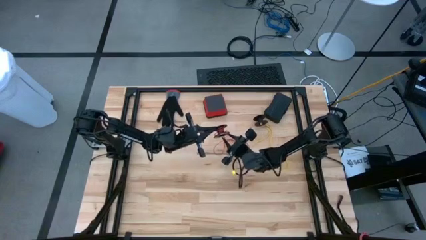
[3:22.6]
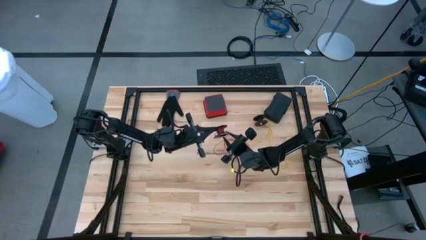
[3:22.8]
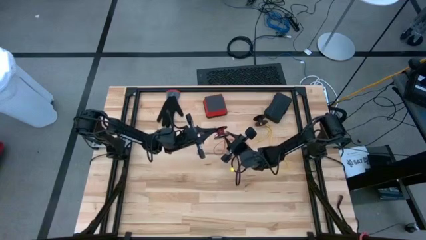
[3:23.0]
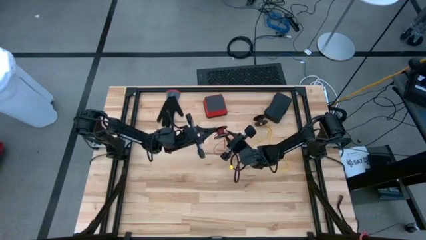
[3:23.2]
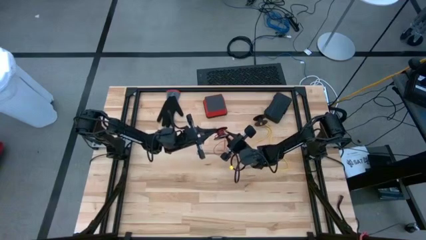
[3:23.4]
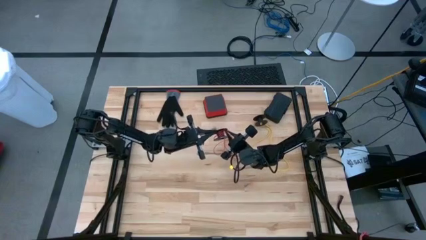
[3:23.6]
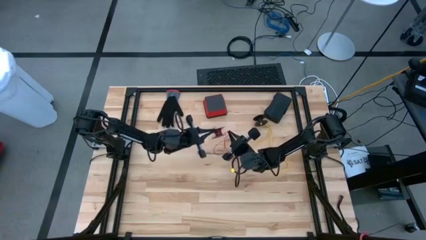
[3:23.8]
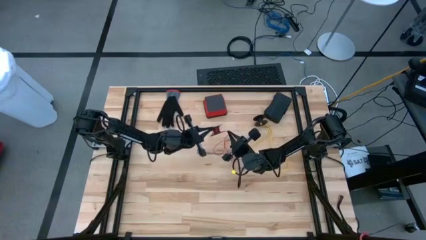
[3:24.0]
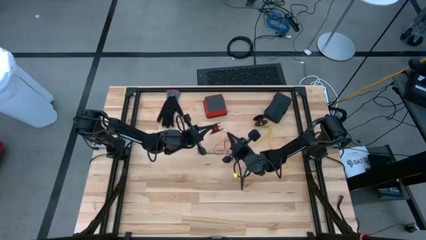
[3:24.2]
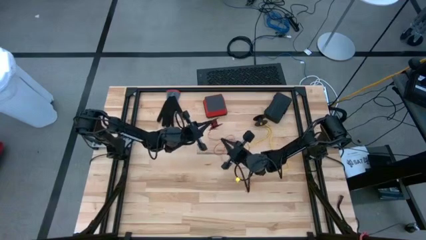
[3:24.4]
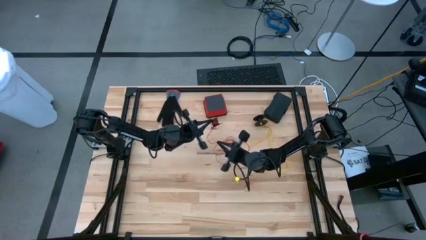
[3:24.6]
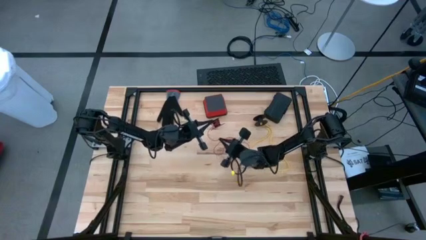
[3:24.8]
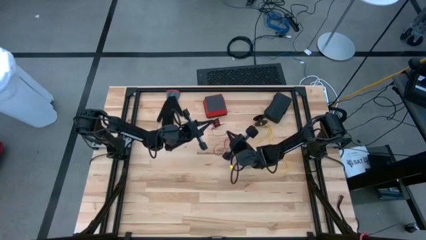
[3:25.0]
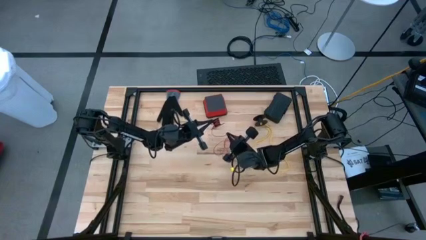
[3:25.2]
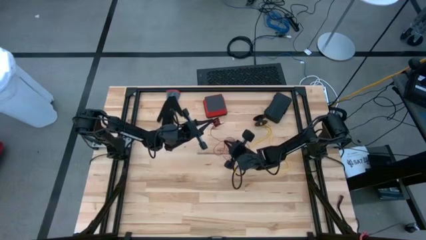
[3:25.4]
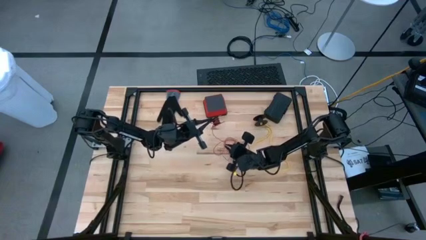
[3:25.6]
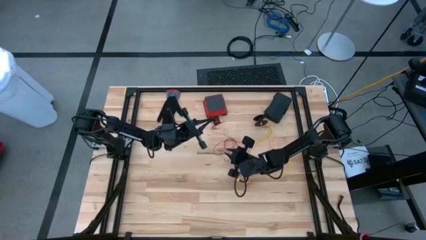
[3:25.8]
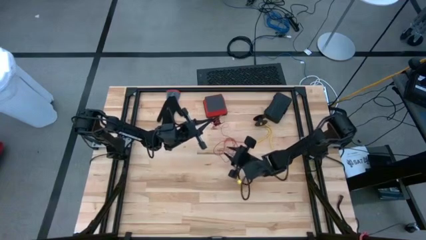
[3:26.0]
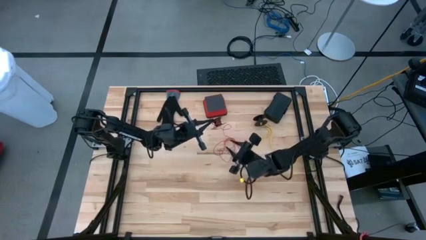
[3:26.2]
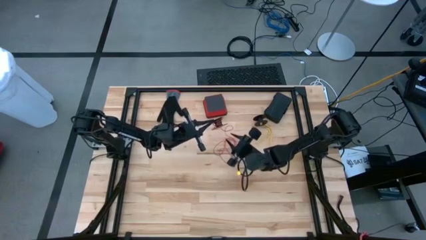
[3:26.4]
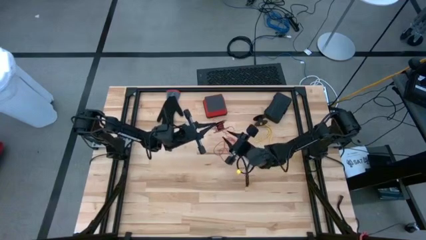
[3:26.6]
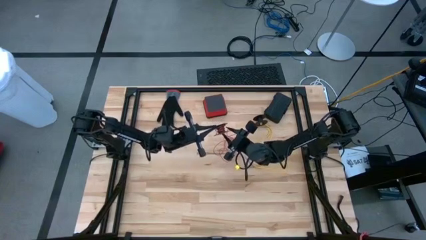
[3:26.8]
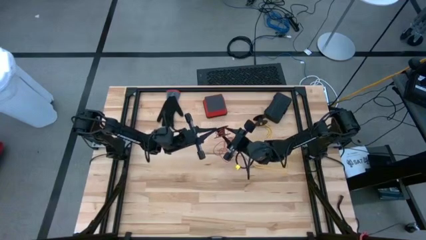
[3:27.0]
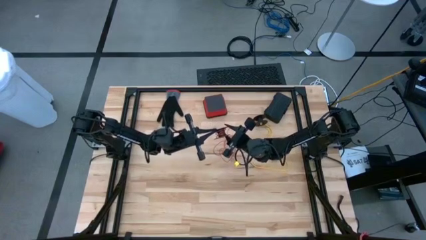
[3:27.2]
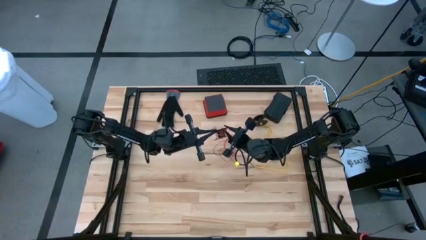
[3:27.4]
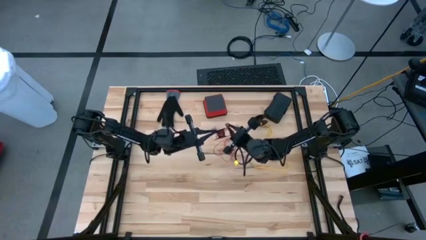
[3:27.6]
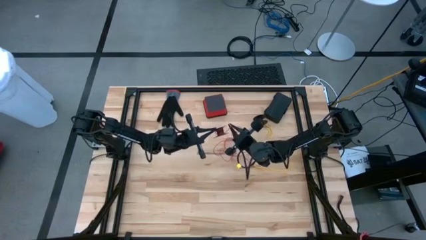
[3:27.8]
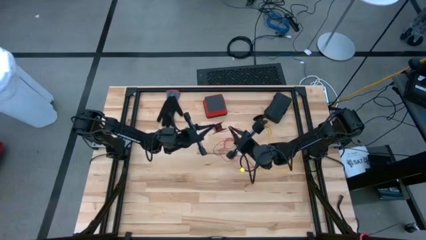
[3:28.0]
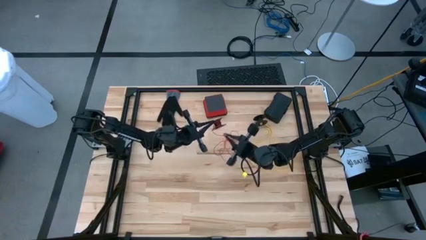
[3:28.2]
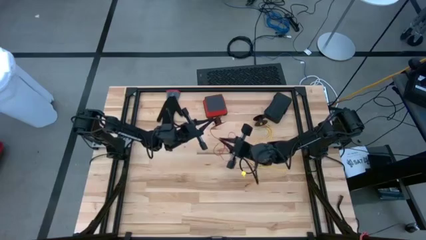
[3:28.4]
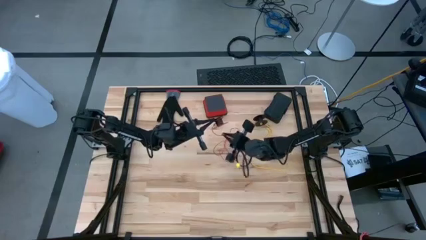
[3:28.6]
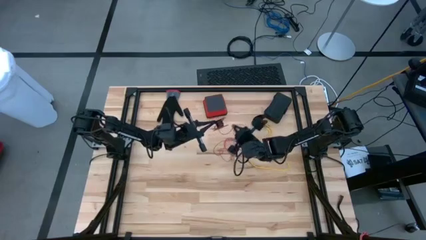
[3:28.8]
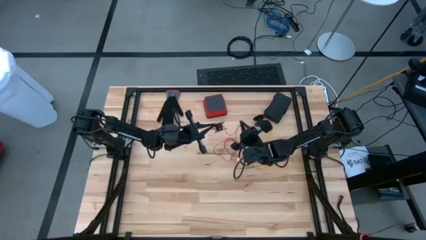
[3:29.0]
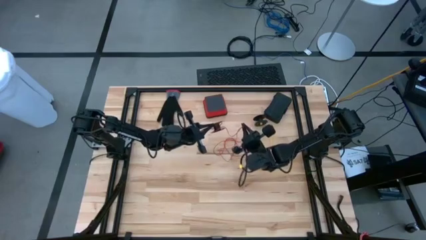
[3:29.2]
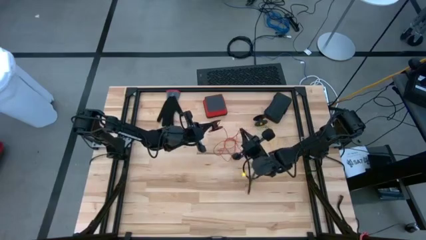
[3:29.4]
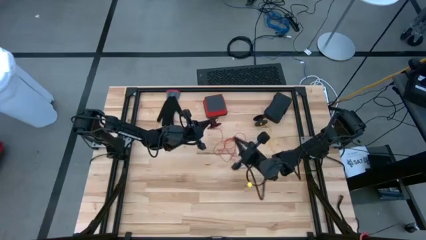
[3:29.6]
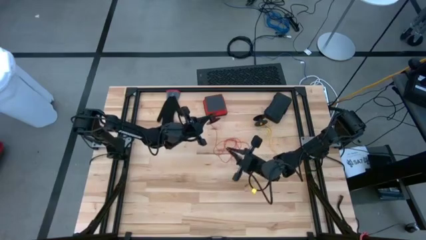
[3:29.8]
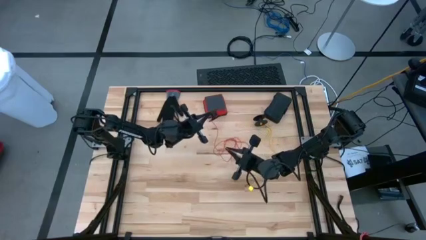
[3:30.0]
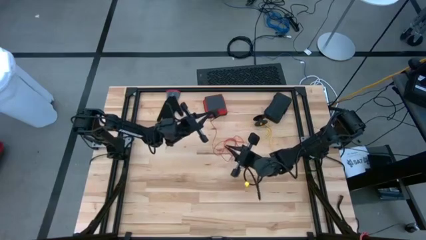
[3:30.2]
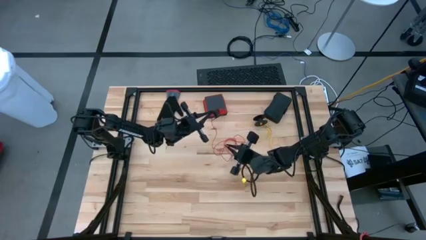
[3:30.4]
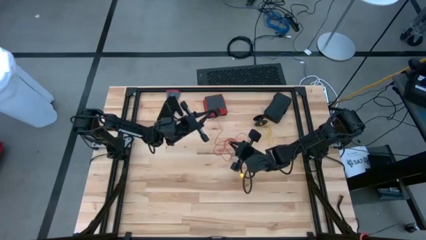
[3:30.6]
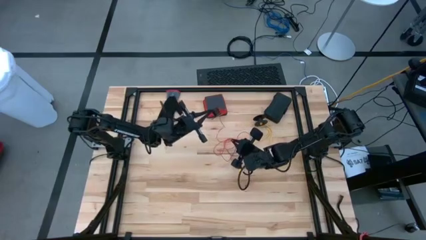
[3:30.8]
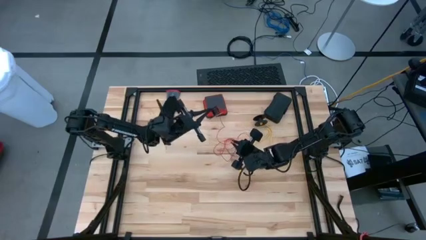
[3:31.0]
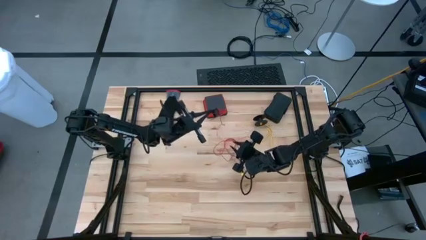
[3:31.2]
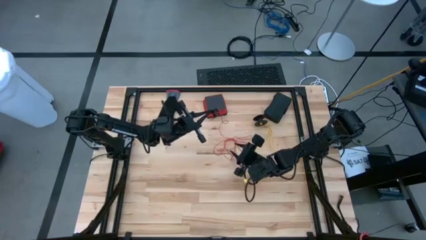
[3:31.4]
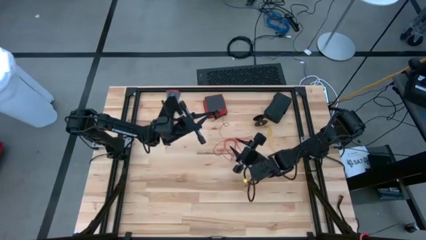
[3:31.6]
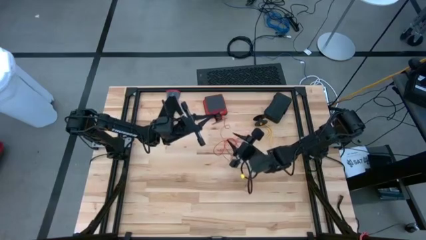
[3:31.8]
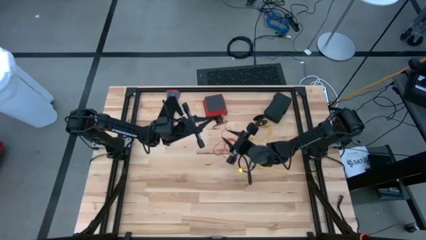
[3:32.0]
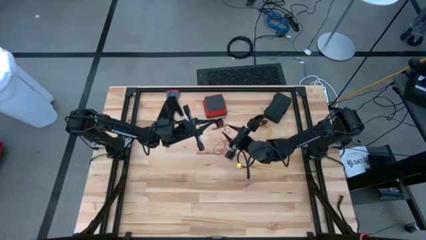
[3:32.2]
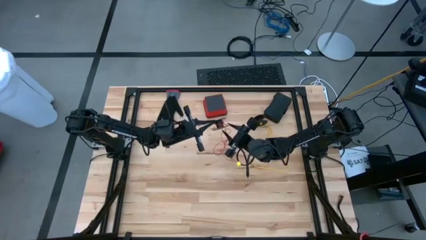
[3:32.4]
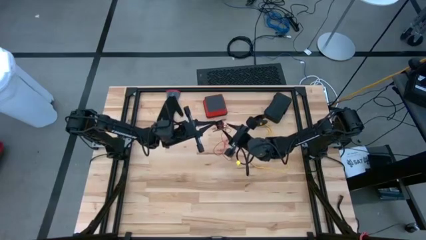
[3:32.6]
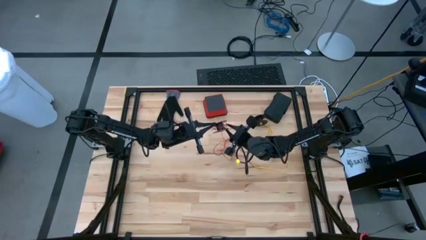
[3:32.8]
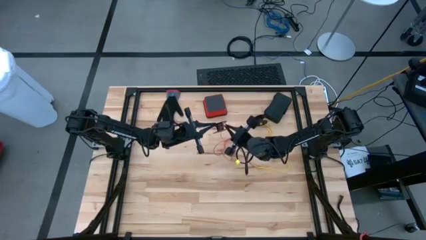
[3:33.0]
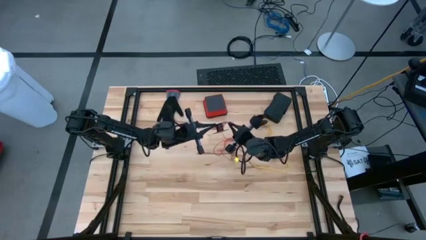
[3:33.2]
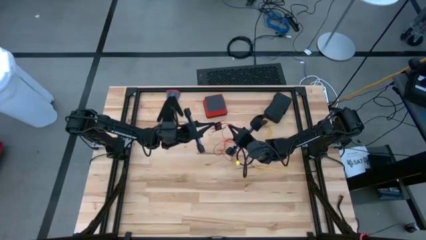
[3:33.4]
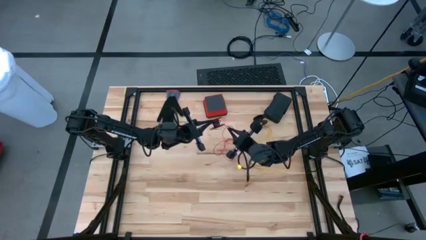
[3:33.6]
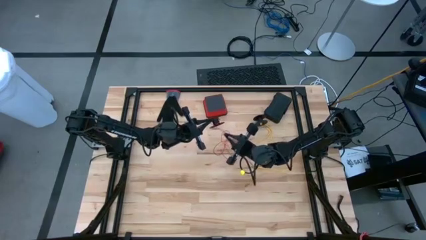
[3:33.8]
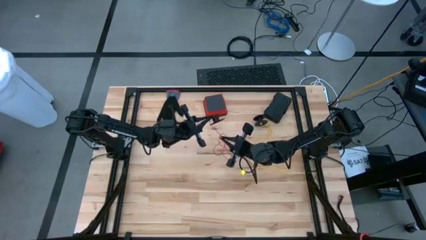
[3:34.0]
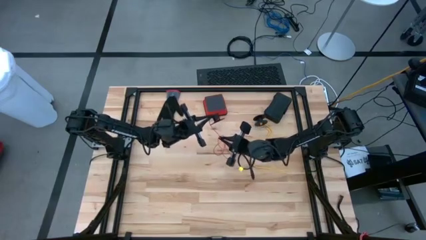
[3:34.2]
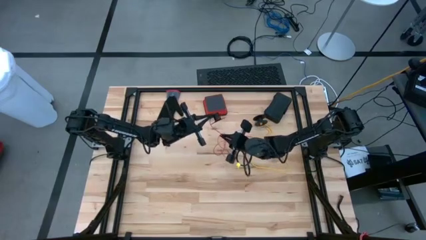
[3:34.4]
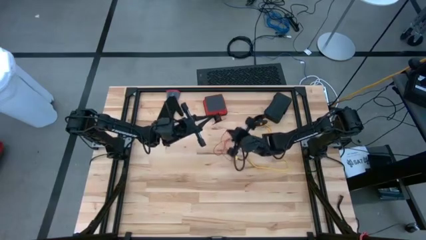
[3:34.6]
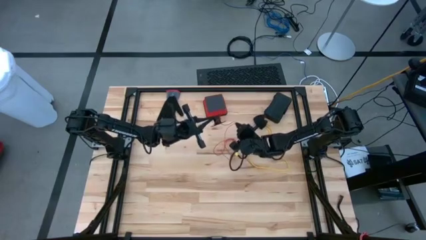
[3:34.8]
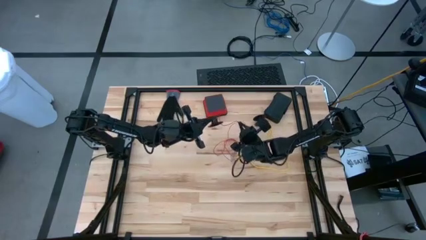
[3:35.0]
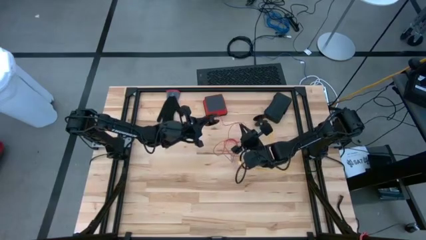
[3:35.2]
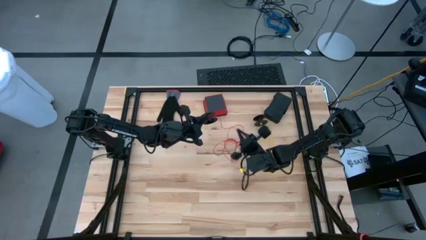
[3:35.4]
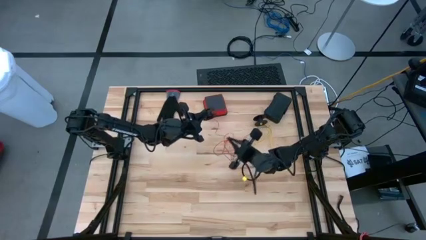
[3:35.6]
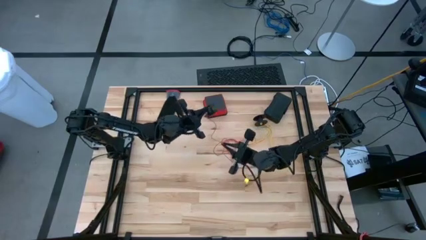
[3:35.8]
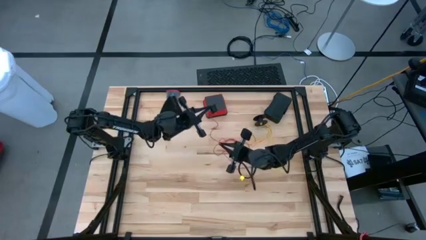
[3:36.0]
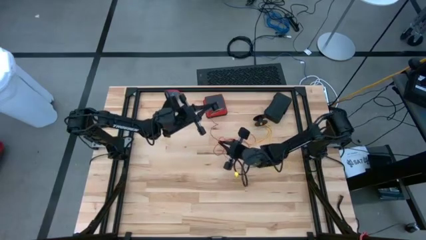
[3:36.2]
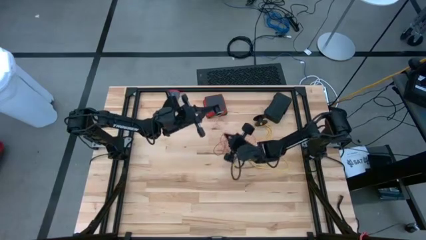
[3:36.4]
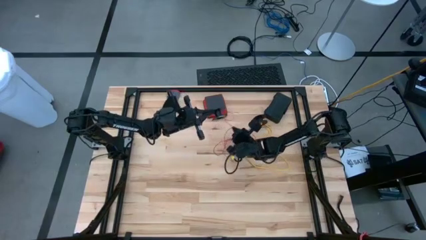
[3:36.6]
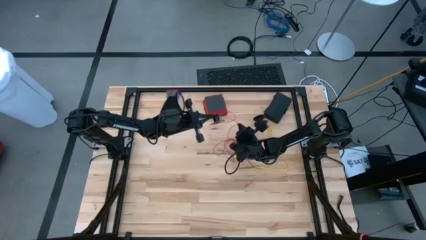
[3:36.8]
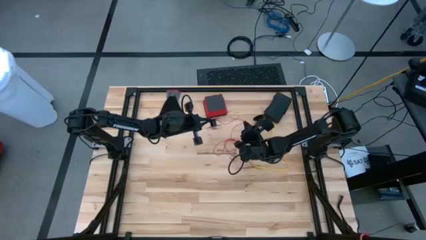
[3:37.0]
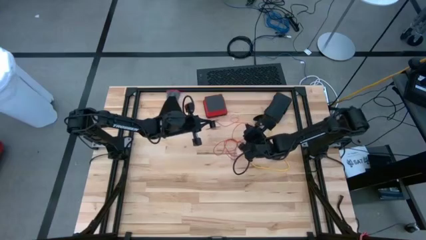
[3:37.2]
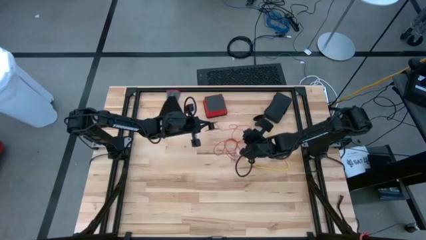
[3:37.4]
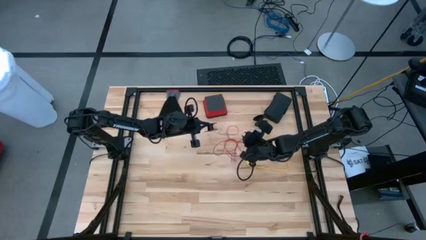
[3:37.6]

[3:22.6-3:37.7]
Task: Coil cords
Uncoil the red wire from the spool

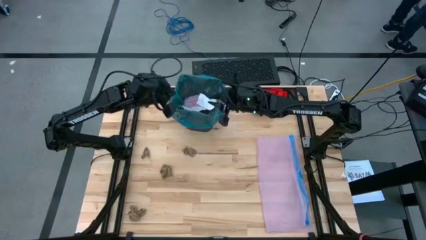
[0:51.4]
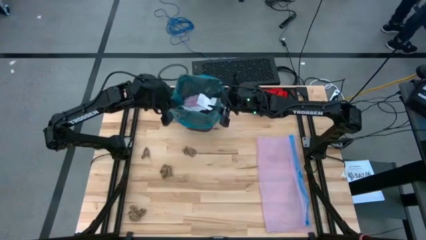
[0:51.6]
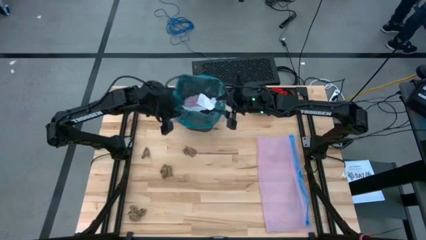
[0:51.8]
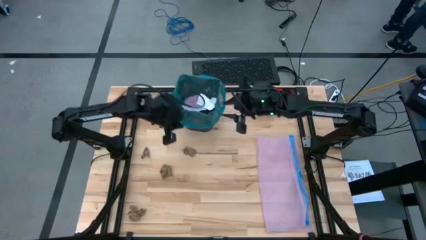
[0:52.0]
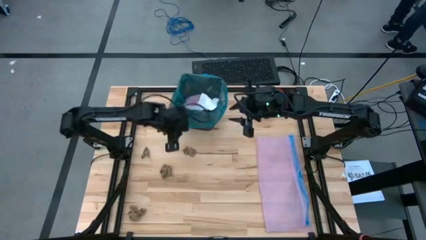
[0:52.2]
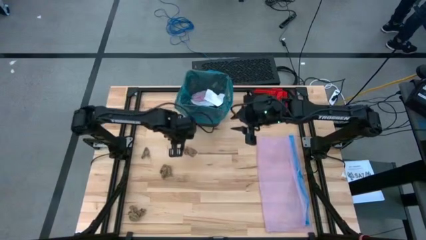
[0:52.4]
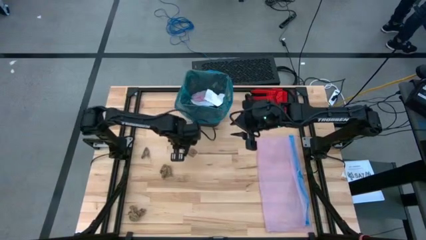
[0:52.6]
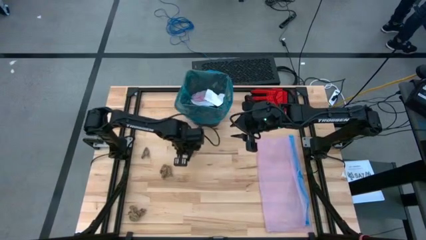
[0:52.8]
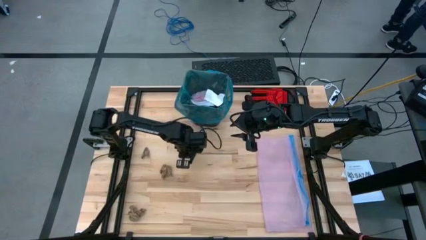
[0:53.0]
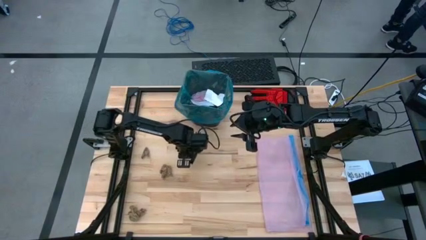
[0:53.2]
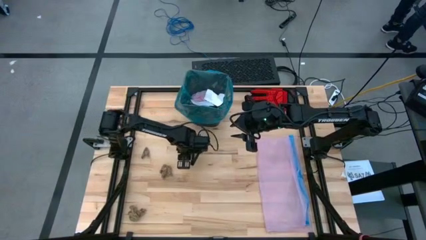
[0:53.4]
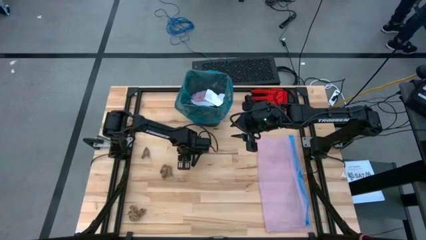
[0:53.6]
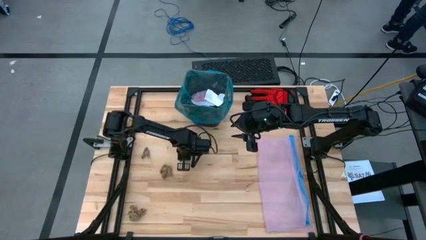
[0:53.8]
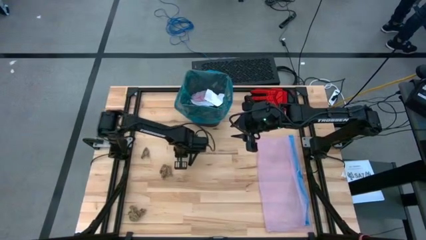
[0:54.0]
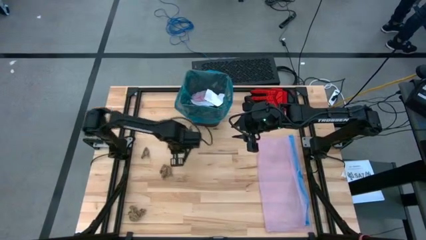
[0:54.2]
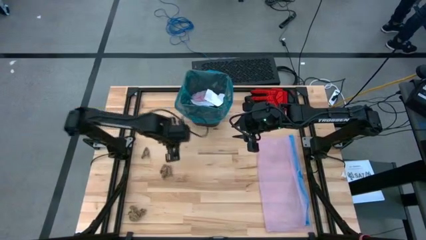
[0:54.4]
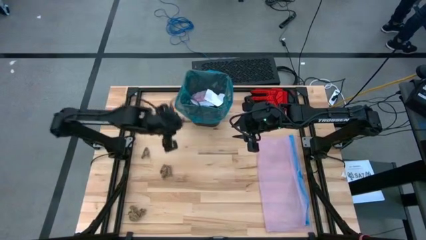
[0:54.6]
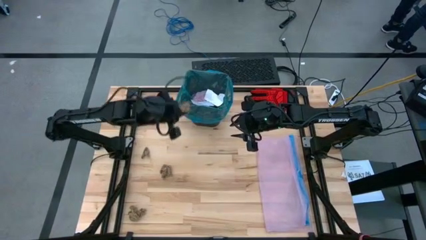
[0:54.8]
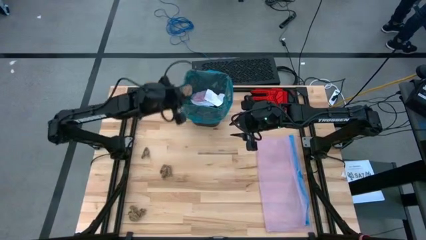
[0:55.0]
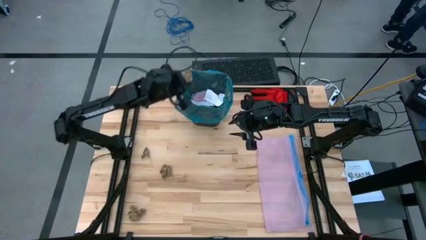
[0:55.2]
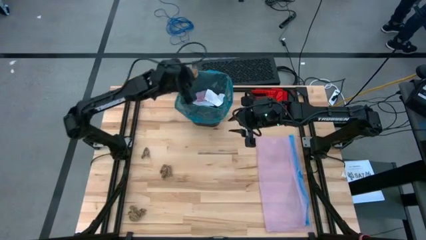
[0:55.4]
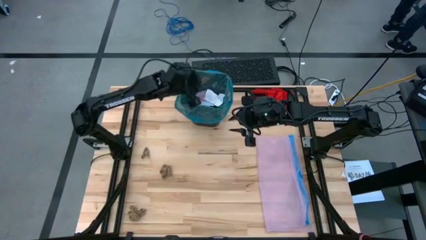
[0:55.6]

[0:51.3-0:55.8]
Task: place trash/remove bag and relplace
Put the brown napkin into the trash bin
